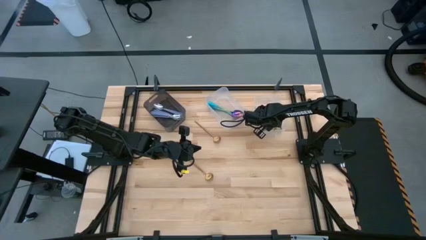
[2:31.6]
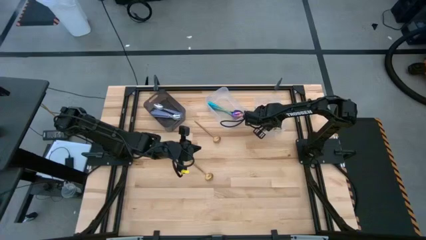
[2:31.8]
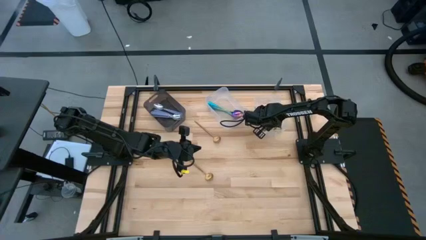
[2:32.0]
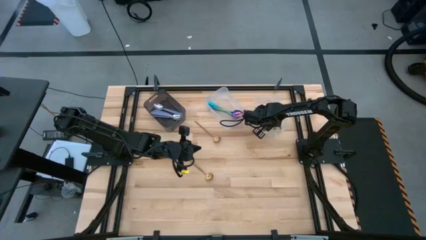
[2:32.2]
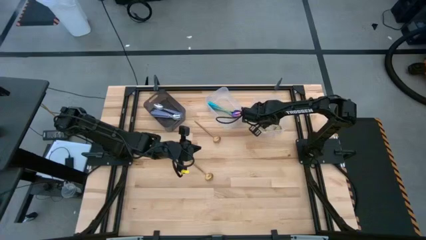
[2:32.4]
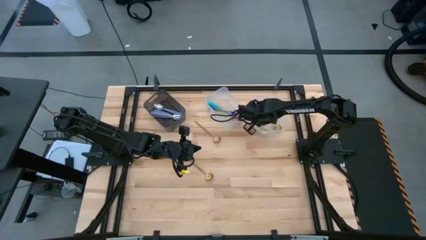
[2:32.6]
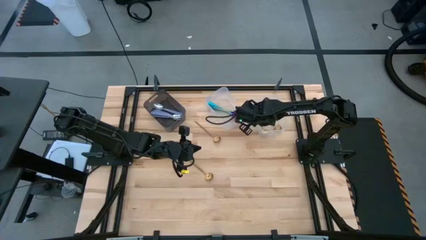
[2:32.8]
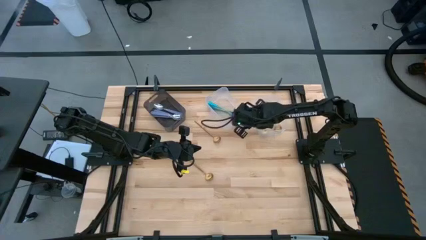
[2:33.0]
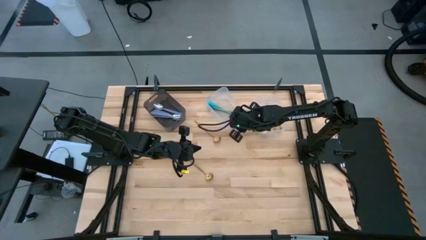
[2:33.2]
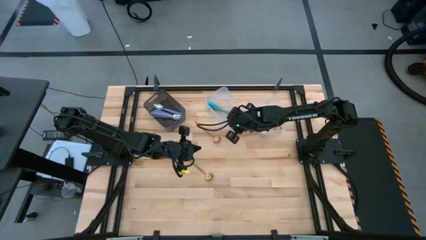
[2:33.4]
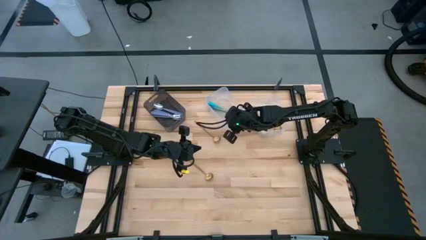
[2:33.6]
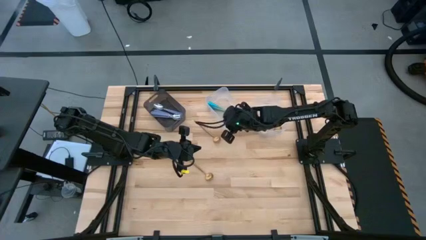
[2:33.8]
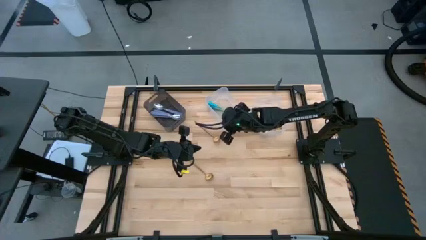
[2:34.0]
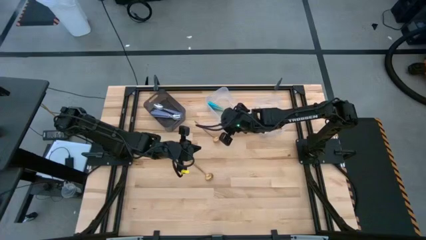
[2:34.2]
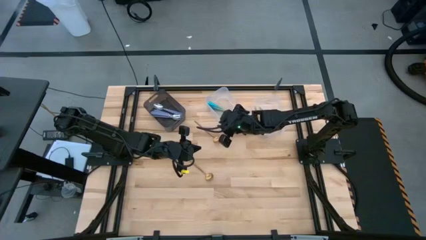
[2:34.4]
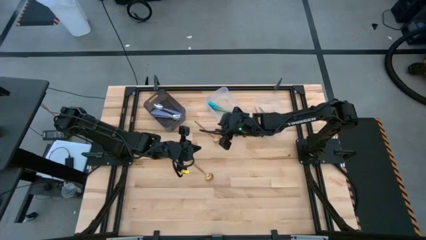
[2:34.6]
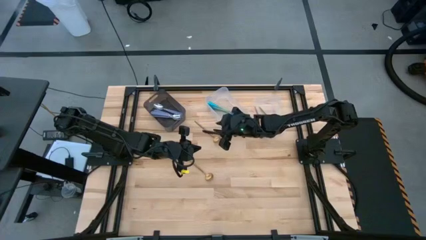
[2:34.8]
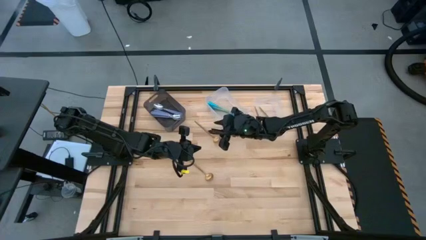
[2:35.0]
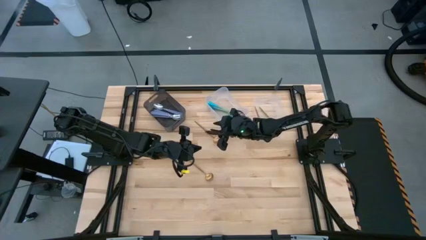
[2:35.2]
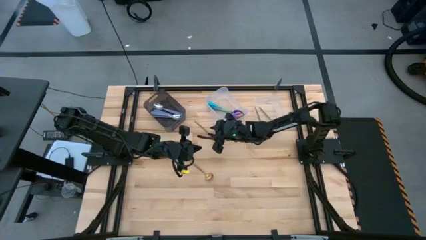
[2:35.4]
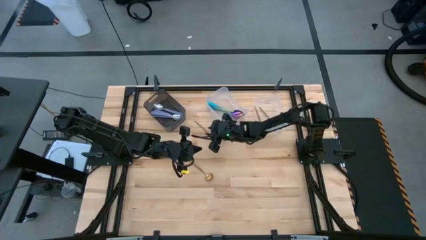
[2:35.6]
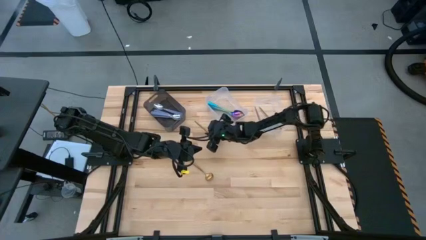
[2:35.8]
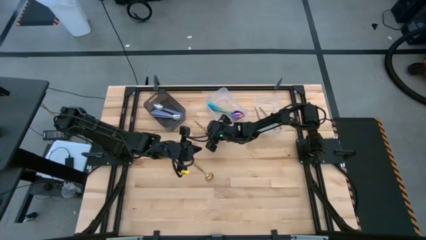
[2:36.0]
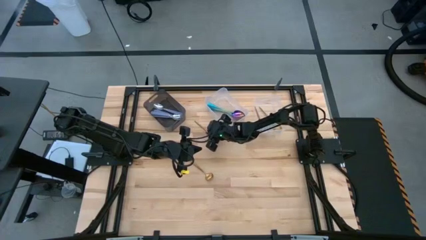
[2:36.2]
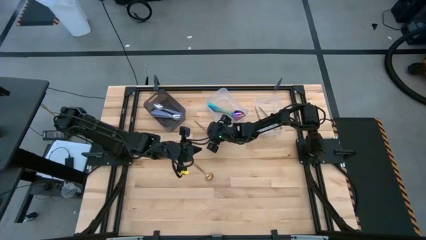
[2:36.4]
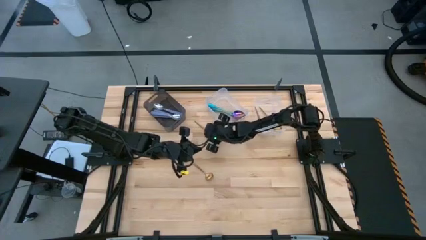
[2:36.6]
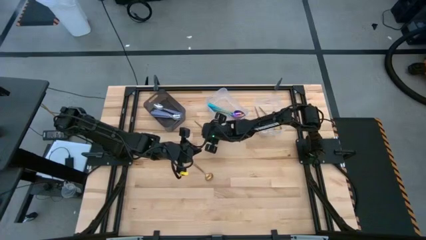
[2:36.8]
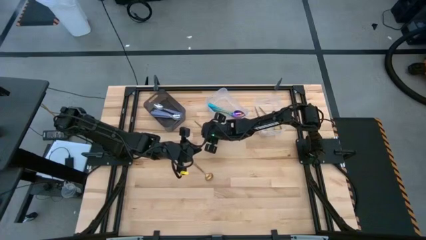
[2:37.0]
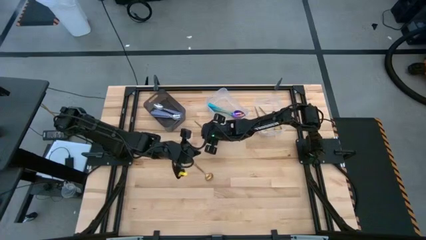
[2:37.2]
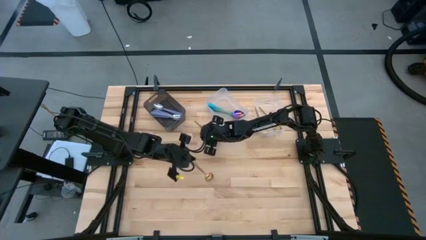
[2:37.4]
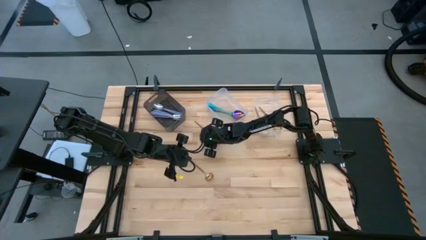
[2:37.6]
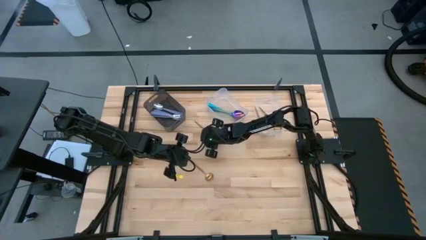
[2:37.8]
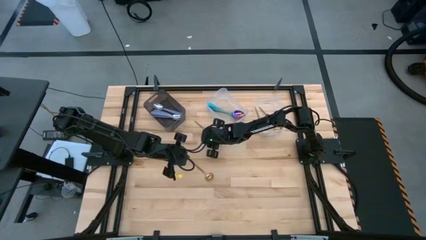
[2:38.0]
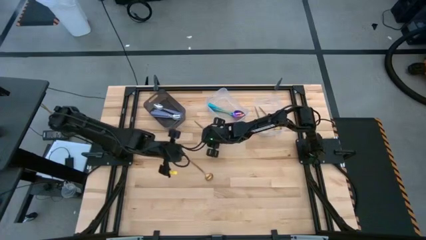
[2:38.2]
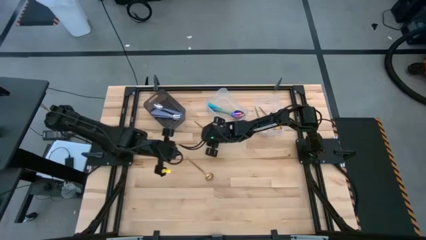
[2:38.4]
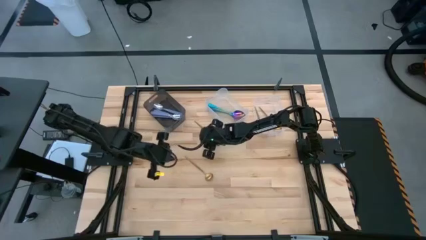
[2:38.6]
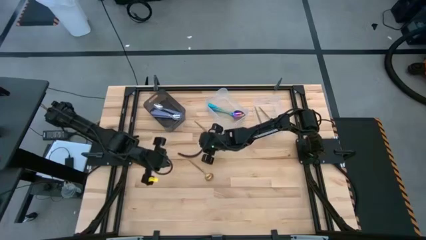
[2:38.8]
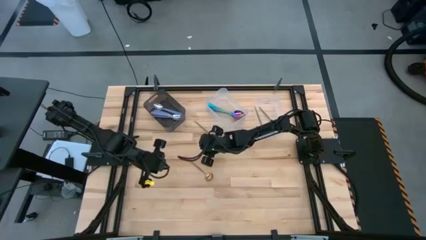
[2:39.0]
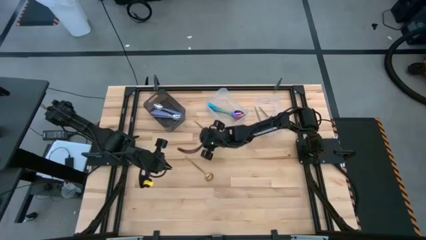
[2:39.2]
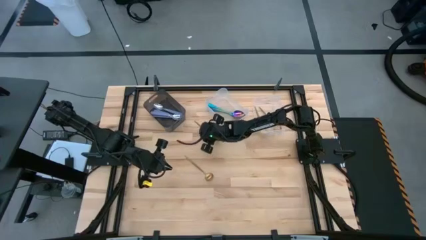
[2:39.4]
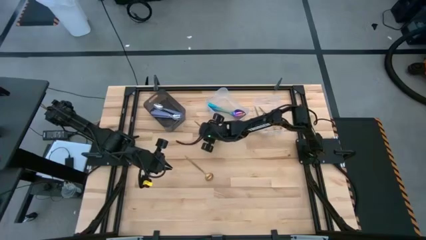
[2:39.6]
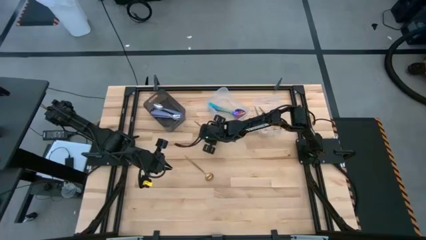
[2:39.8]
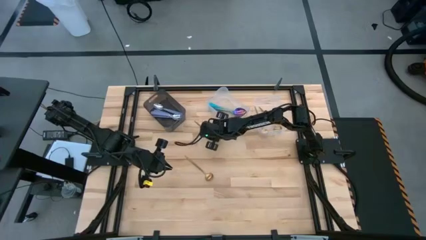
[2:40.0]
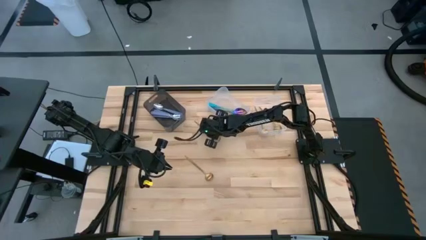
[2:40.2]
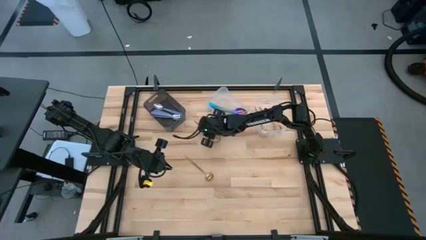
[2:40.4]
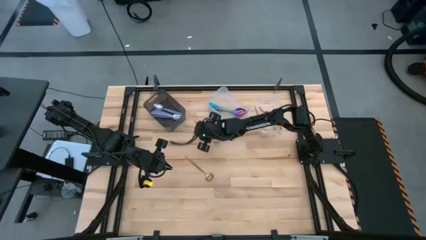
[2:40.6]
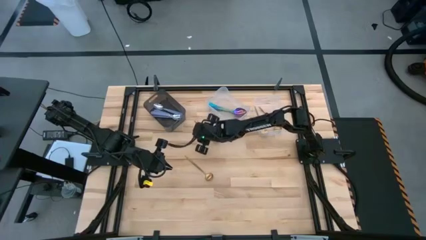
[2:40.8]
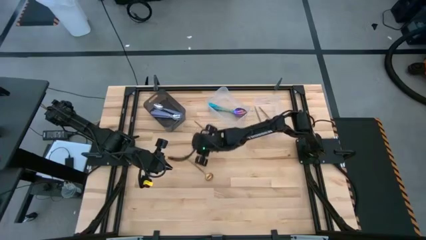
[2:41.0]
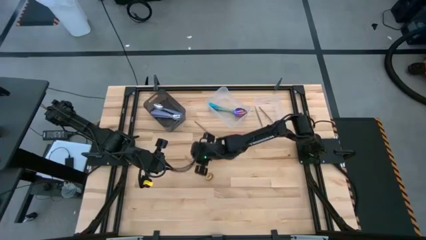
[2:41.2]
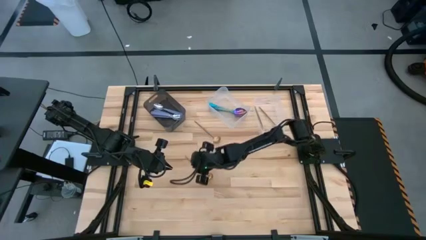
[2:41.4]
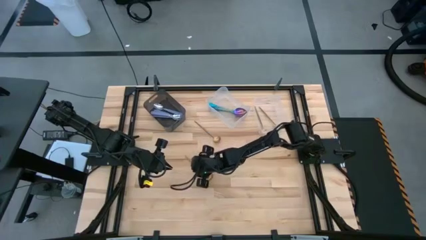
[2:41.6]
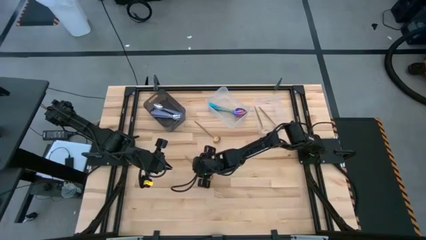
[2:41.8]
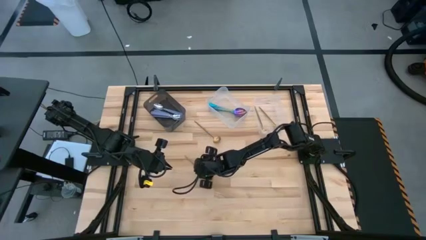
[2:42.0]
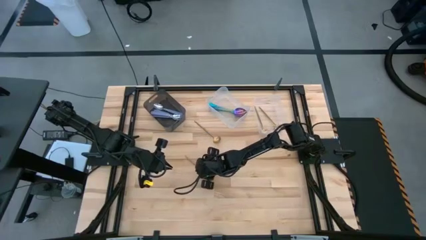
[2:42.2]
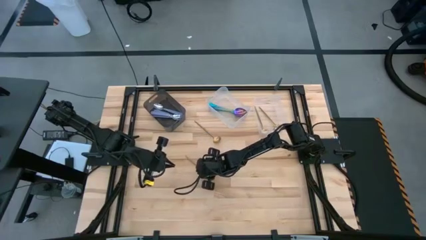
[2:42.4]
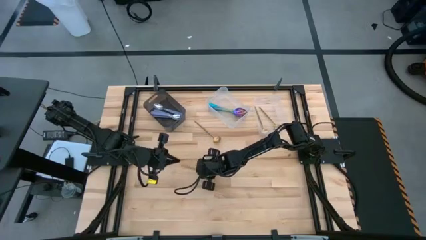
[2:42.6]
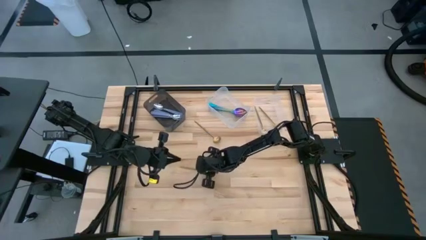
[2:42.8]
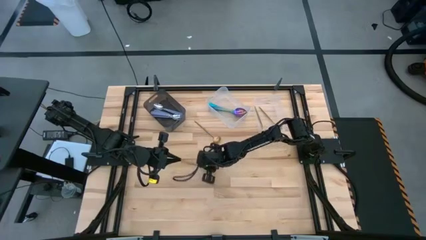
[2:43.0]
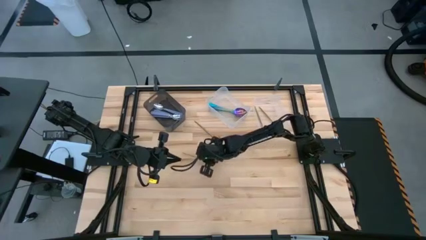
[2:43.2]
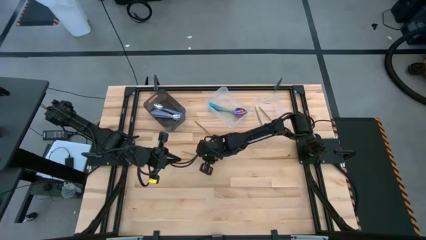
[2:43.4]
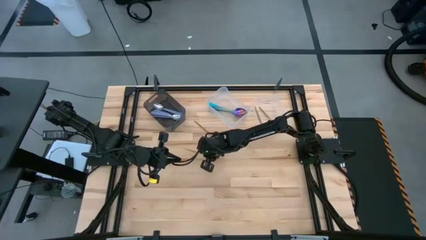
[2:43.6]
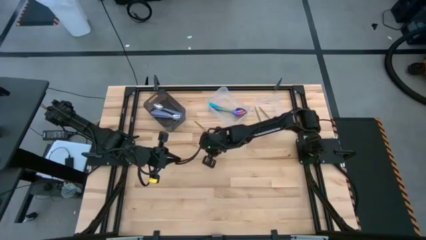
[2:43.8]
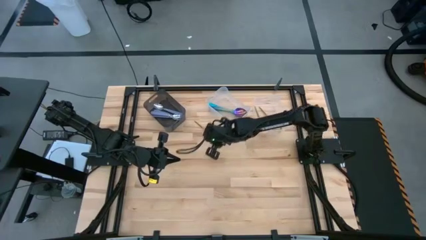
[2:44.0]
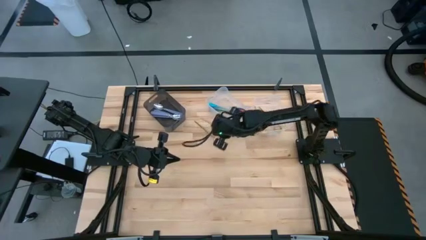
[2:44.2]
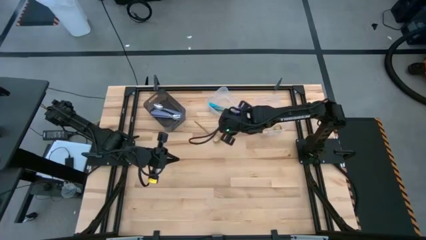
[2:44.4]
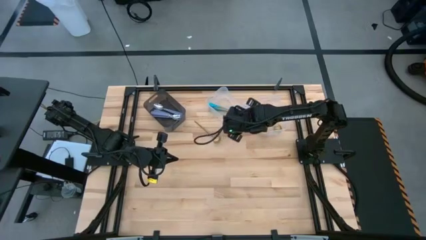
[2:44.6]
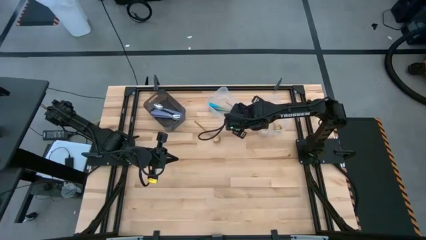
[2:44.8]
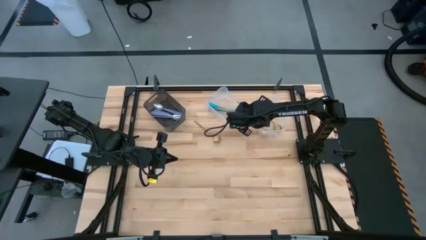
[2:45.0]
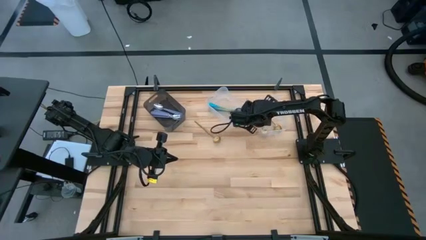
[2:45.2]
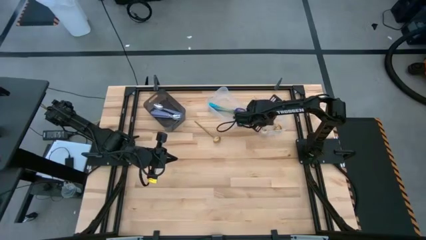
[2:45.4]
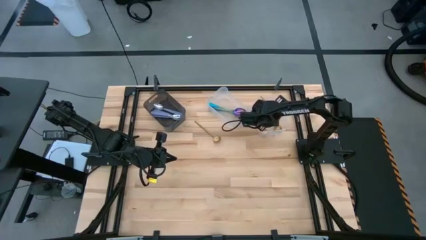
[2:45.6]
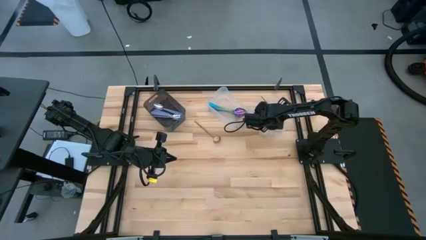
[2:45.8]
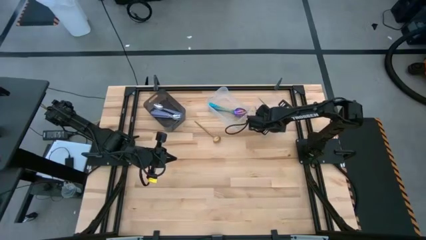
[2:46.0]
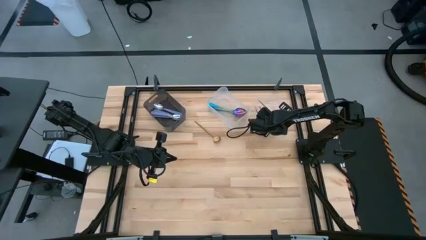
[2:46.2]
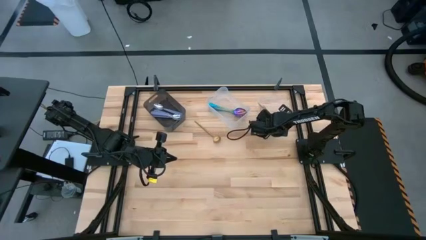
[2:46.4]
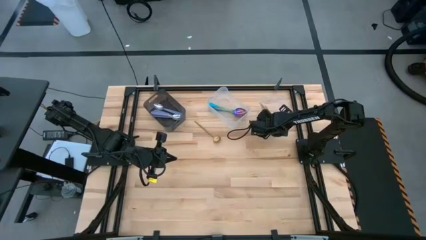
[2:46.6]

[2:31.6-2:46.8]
Task: Sort silverware by color (type)
Put the gold spoon into the right transparent bin
